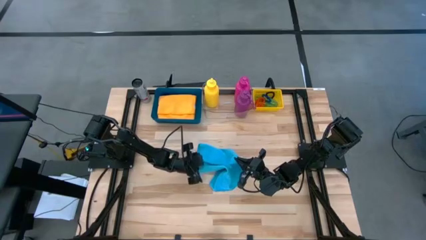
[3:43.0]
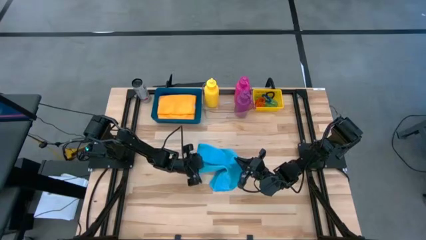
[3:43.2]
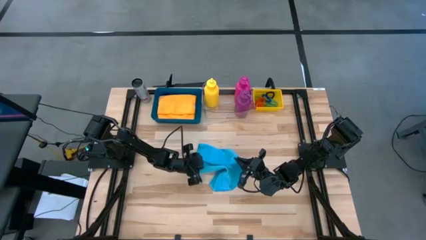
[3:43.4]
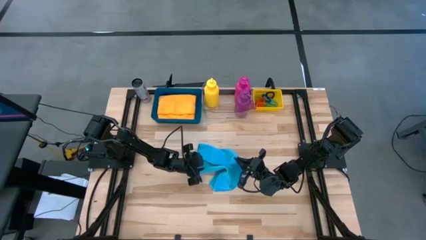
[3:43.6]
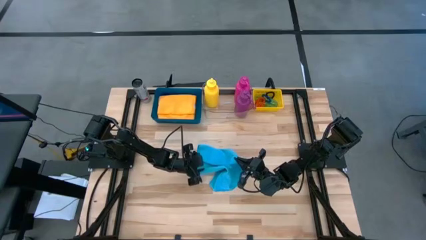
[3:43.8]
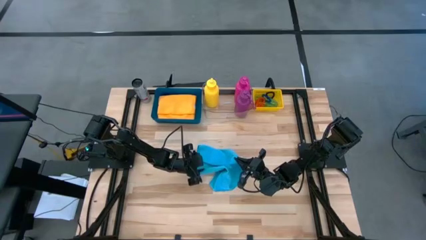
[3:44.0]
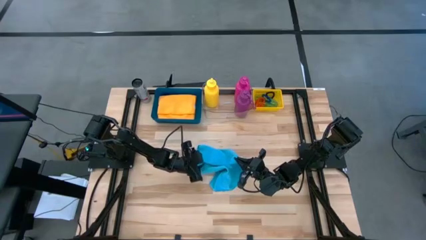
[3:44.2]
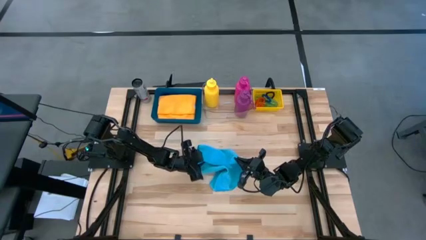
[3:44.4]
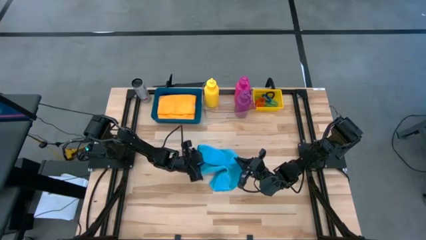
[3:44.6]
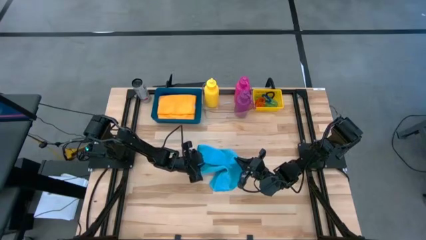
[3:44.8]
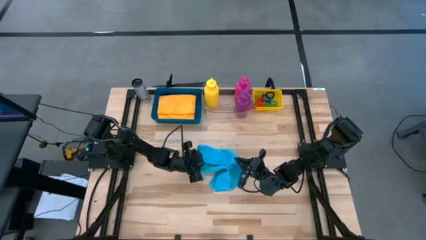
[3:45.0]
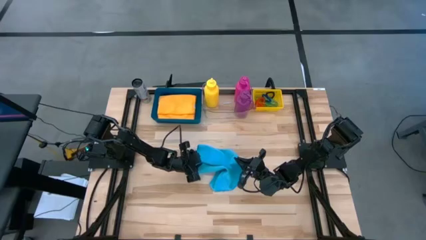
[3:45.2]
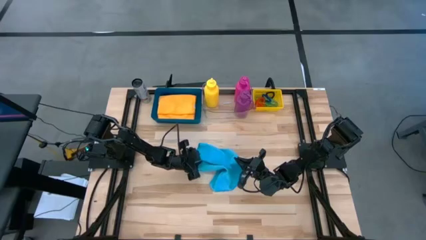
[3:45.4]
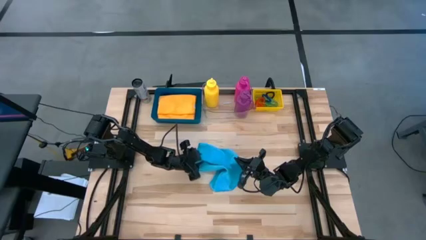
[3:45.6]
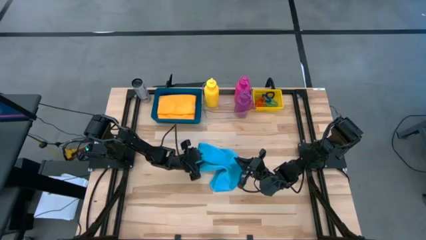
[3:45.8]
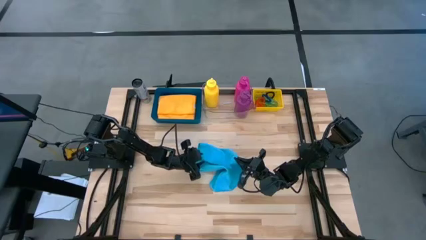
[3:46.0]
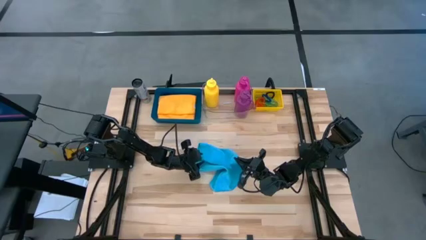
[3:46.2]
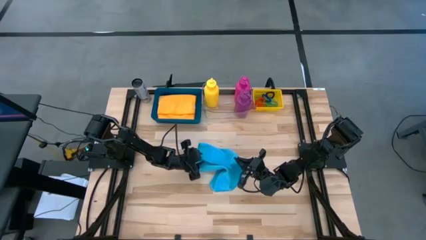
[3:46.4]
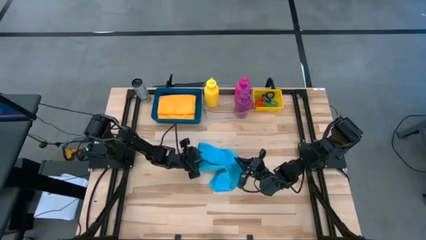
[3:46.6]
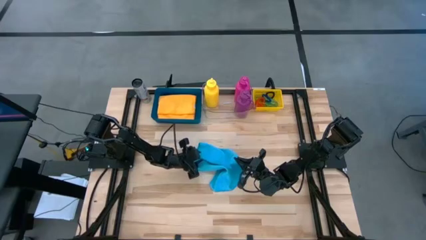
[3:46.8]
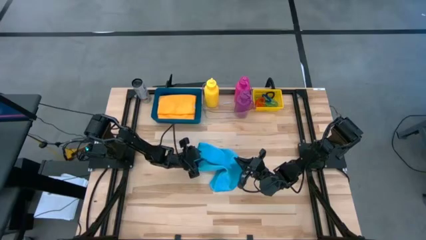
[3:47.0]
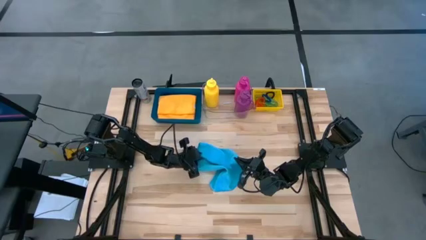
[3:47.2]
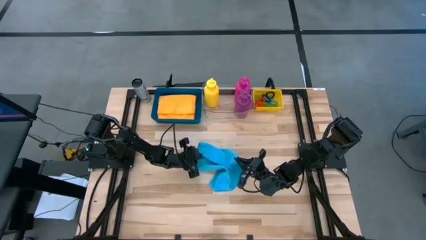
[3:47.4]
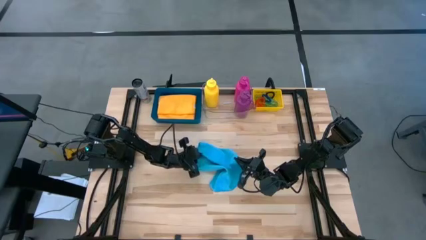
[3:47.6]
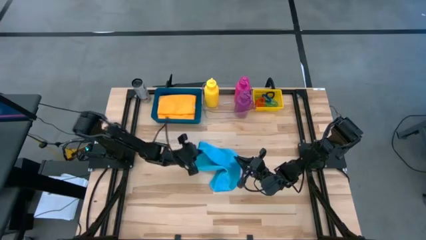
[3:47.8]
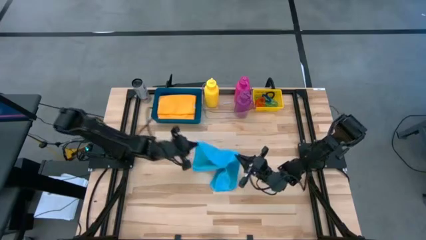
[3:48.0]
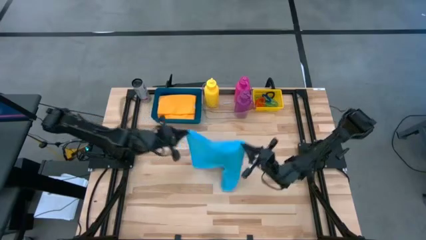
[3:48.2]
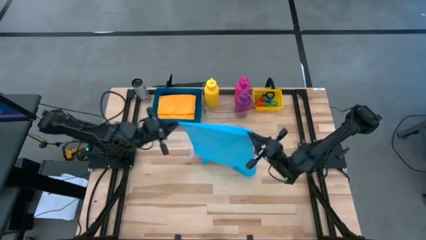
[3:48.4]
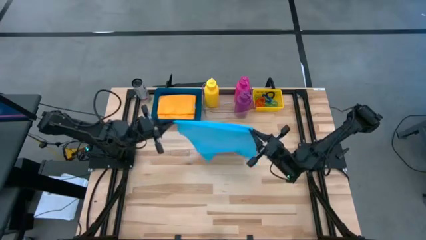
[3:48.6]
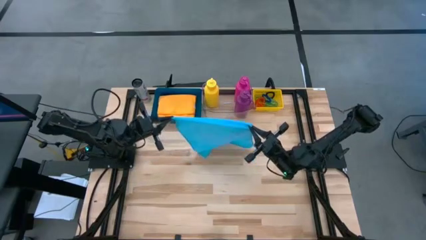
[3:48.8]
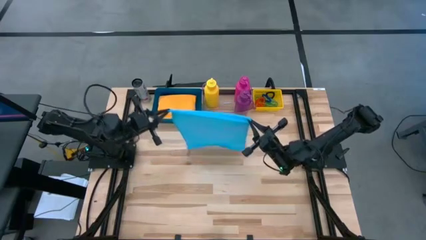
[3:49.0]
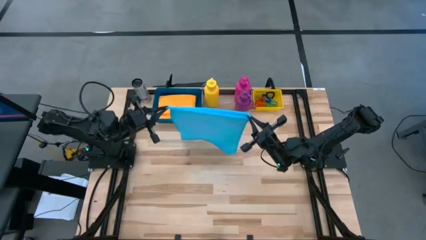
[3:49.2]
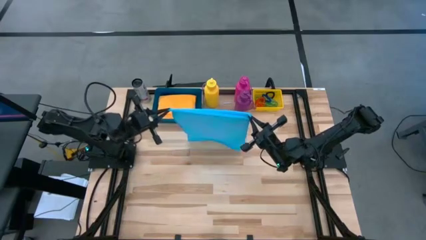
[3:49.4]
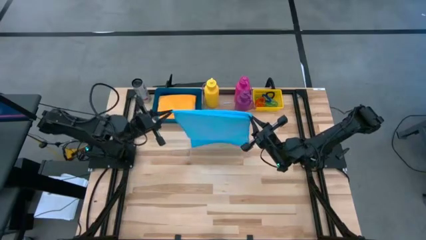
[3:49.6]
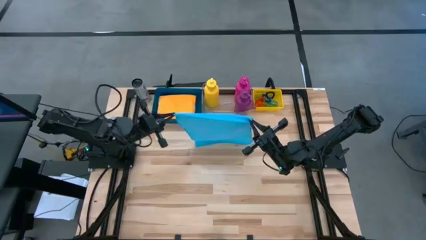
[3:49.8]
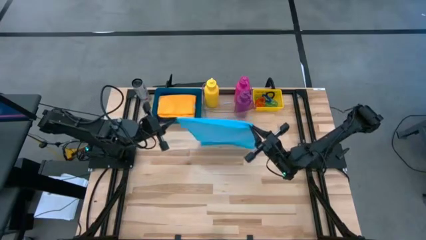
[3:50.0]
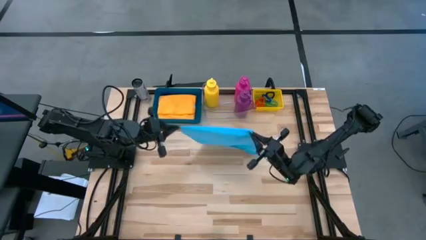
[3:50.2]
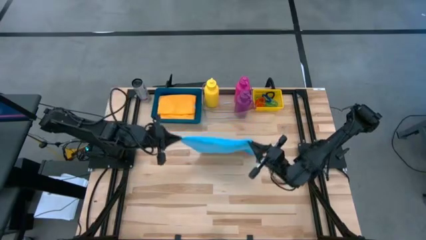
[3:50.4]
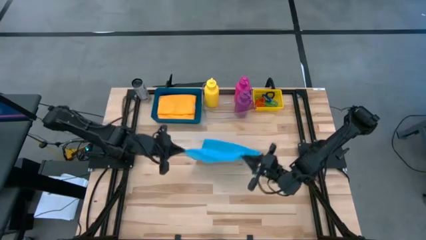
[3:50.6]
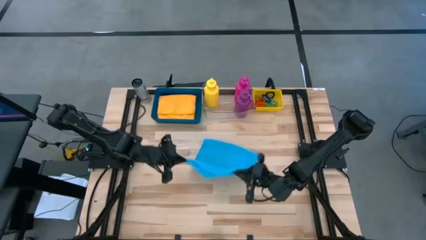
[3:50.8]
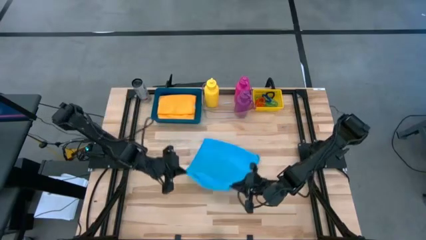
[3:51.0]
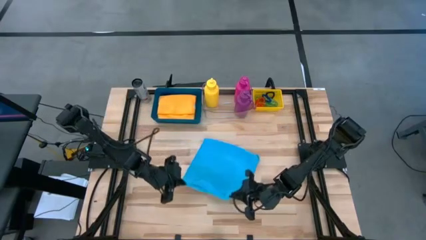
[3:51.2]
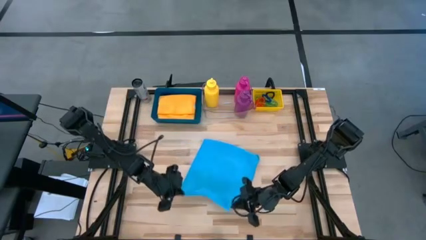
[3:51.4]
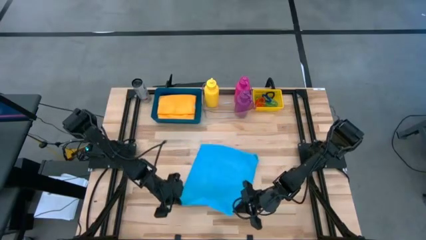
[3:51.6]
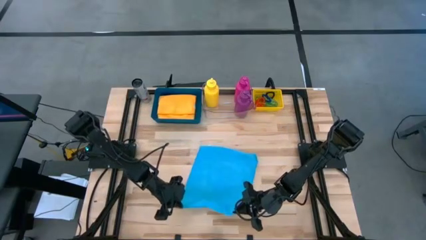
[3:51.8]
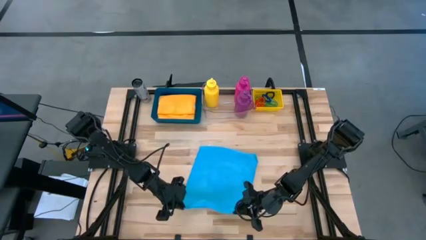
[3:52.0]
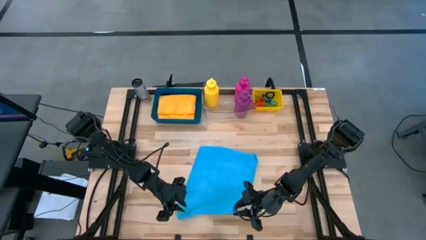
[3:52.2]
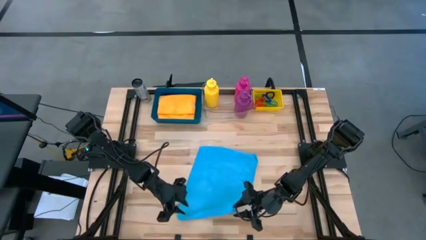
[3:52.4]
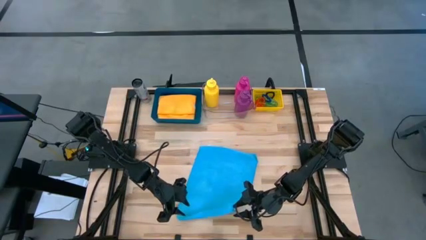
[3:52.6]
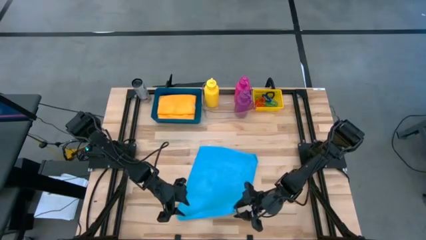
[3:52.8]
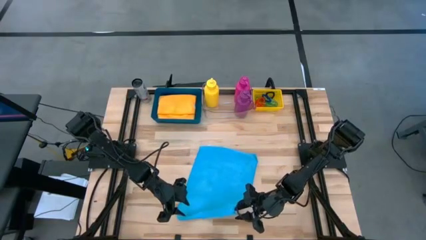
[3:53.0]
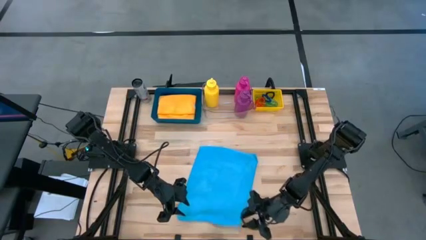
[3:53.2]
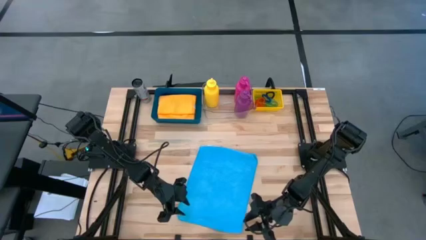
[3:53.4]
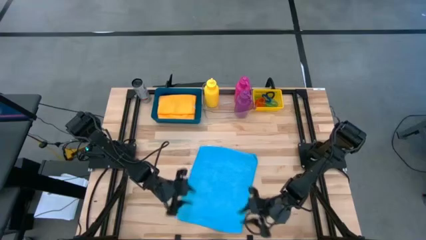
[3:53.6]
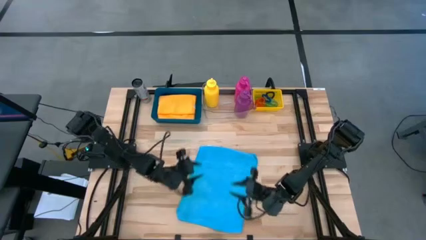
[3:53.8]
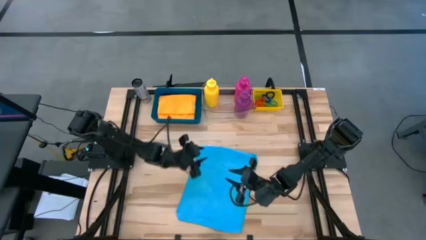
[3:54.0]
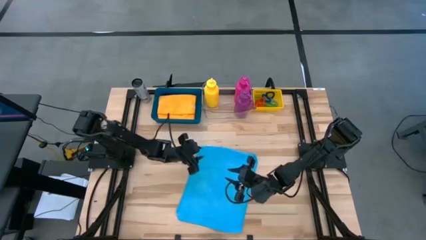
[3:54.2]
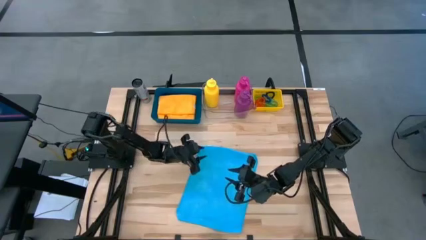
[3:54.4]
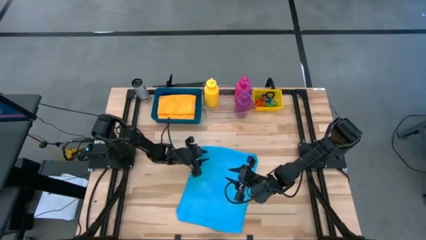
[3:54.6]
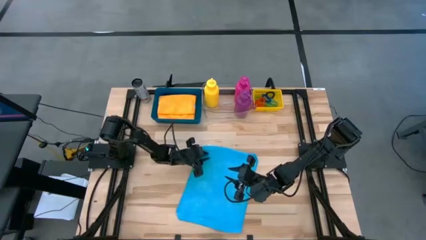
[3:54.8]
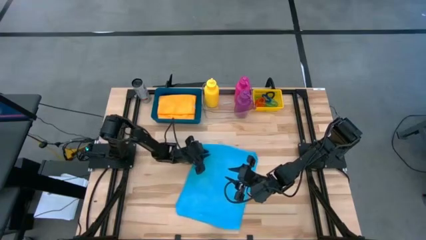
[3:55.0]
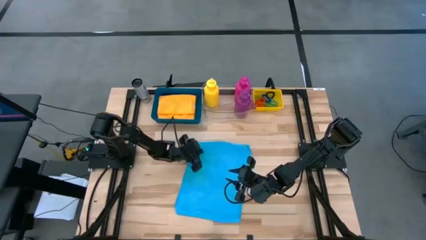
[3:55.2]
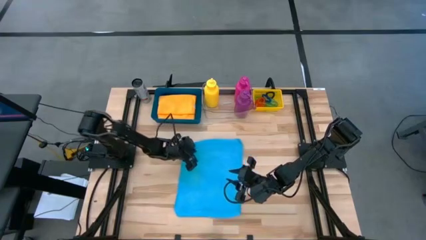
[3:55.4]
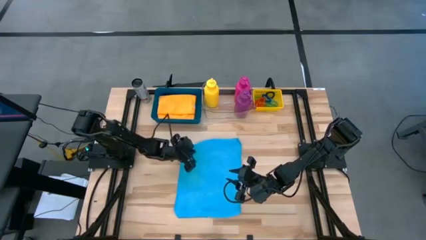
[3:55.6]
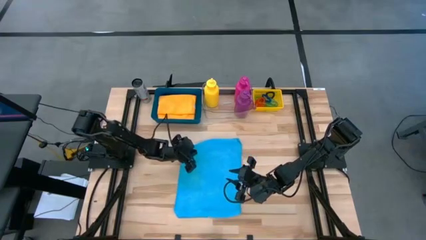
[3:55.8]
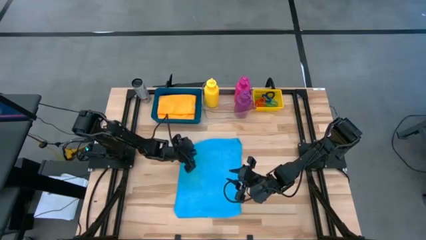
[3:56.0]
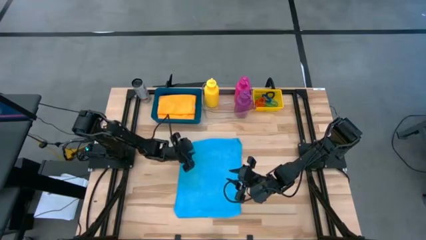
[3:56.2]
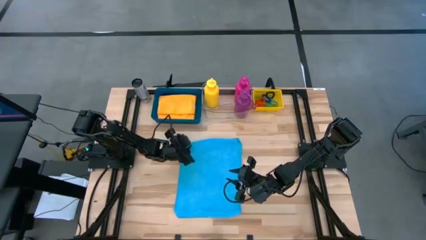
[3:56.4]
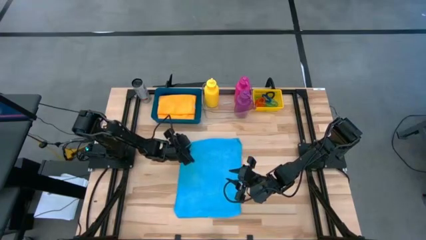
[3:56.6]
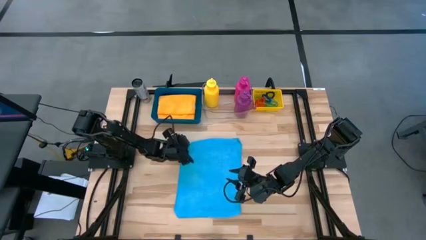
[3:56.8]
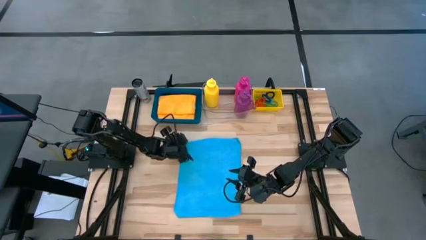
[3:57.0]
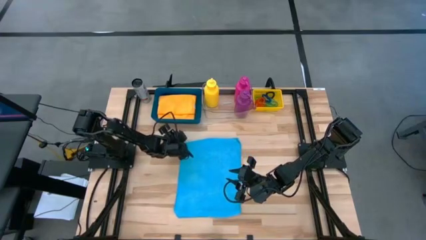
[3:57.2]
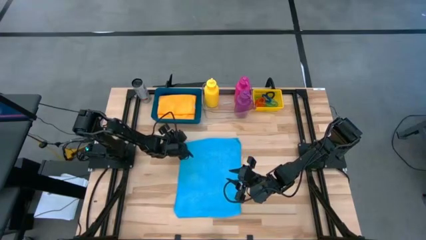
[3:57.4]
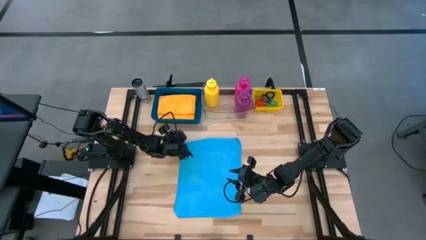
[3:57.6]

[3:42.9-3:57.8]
Task: Pick & Place Sports Items
Fold the blue towel
